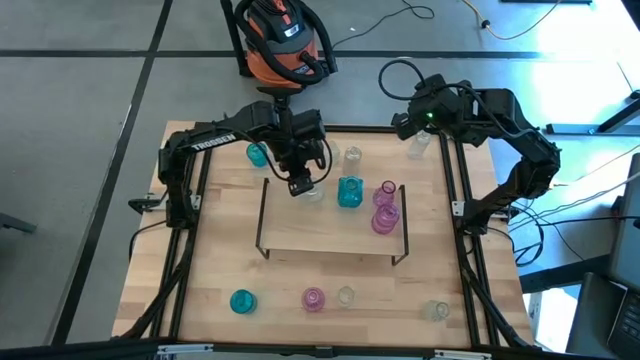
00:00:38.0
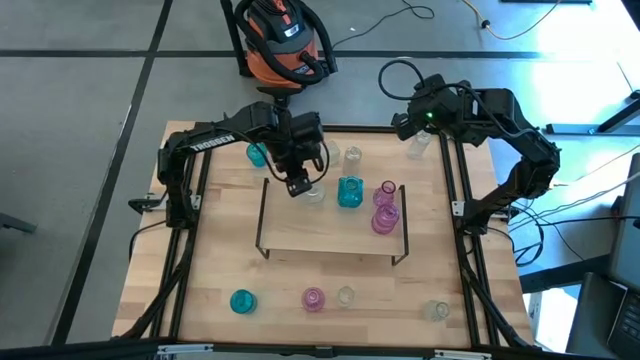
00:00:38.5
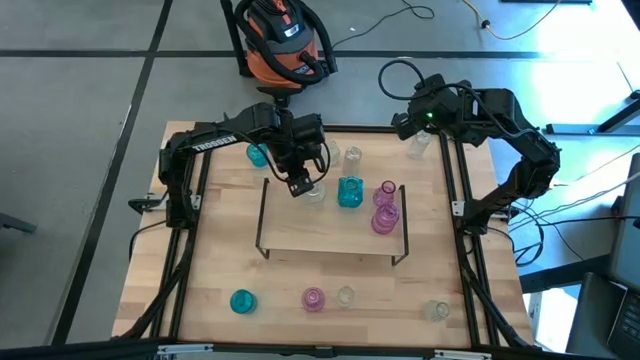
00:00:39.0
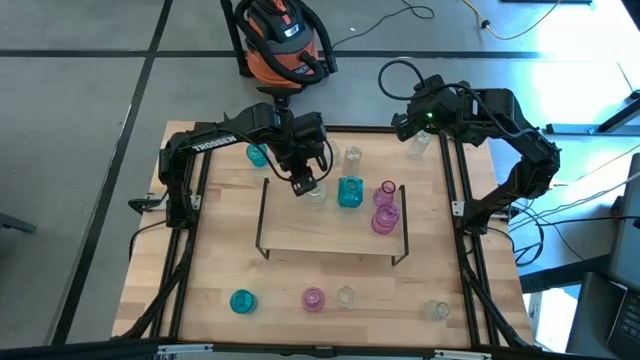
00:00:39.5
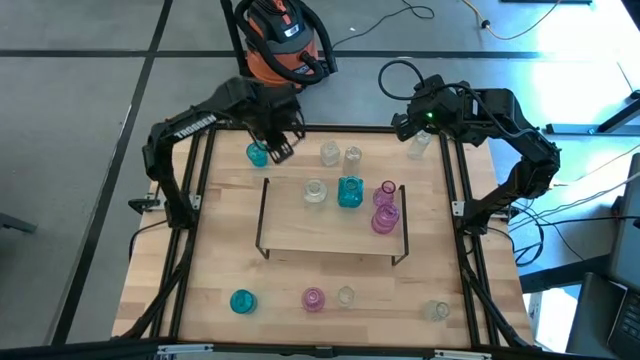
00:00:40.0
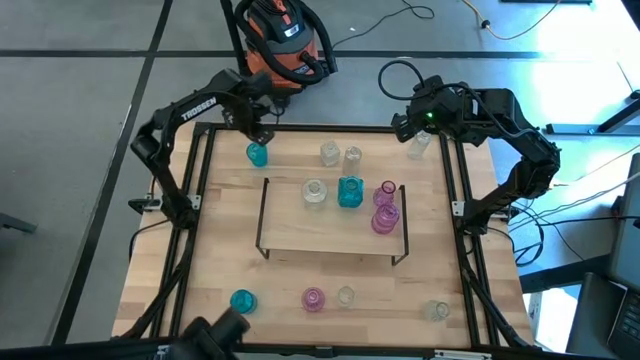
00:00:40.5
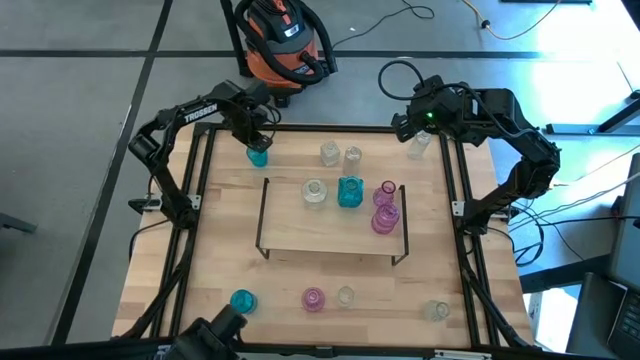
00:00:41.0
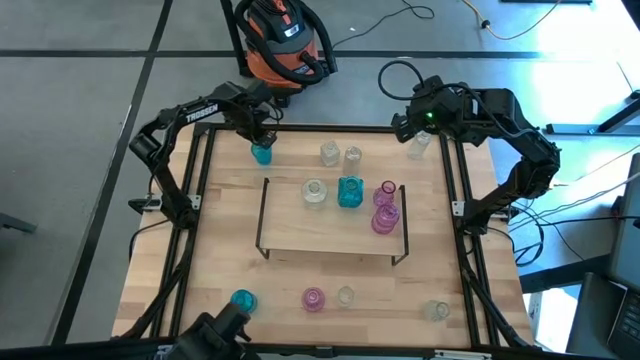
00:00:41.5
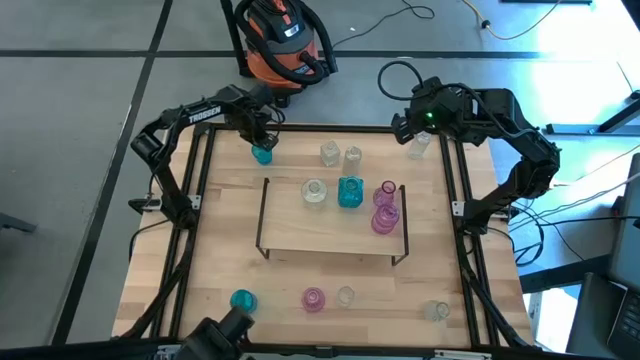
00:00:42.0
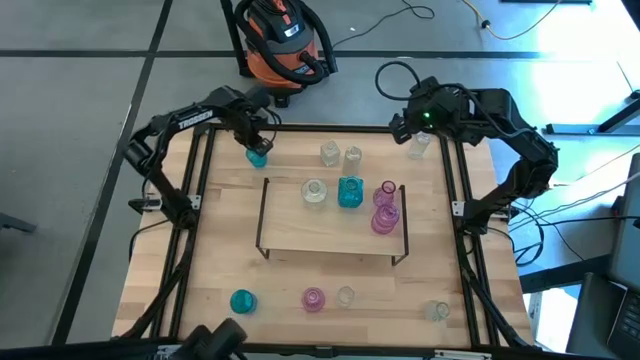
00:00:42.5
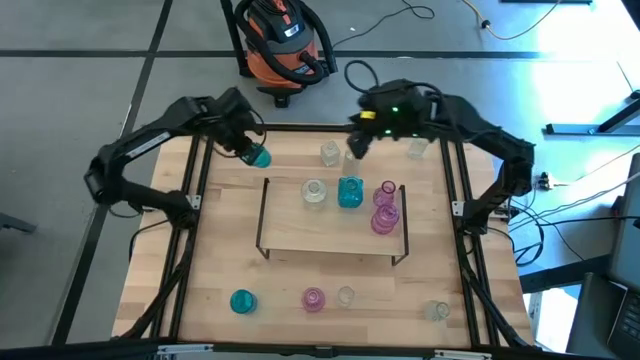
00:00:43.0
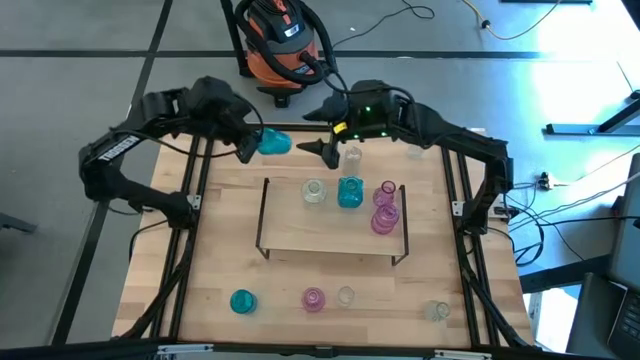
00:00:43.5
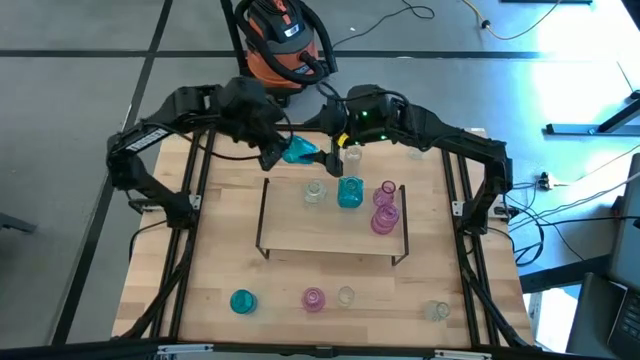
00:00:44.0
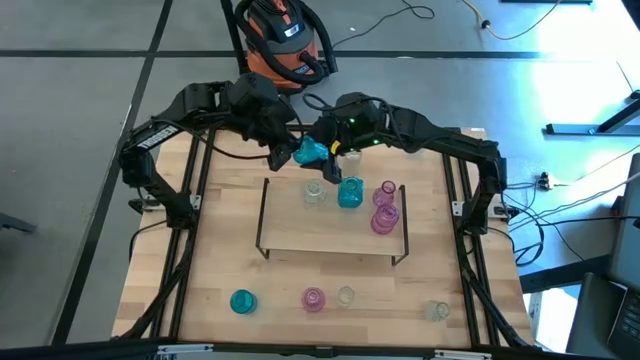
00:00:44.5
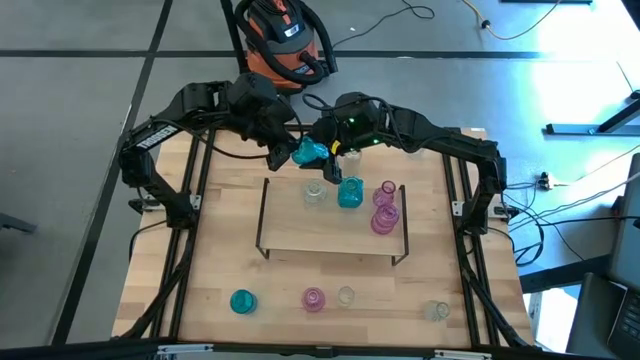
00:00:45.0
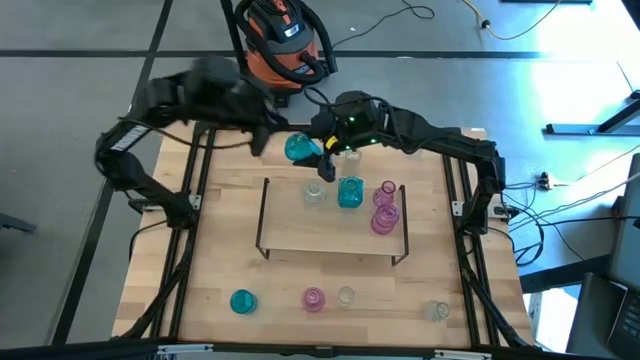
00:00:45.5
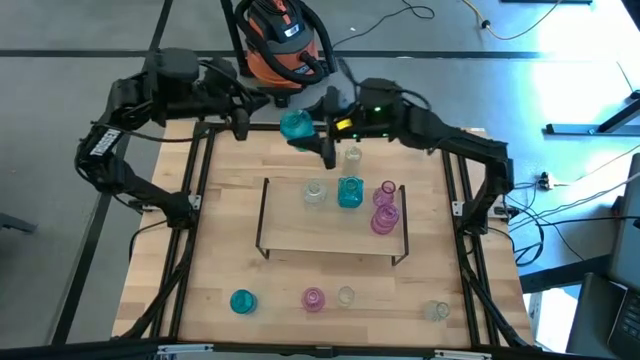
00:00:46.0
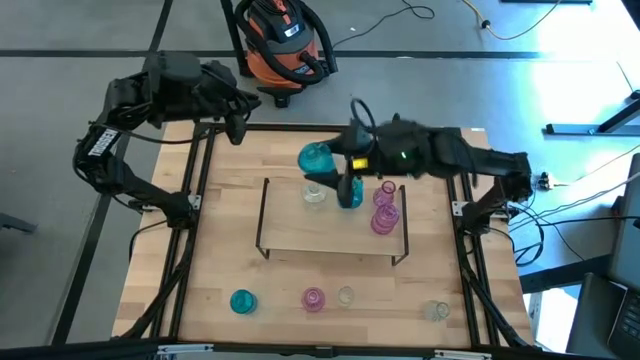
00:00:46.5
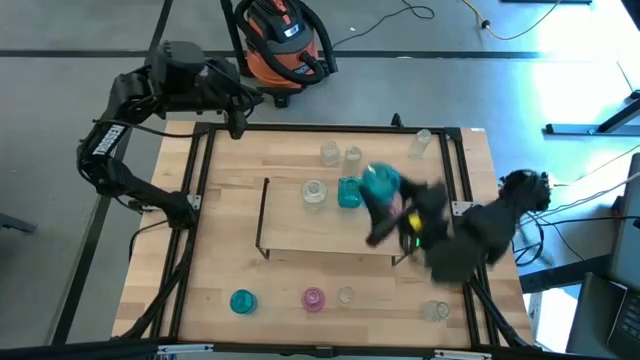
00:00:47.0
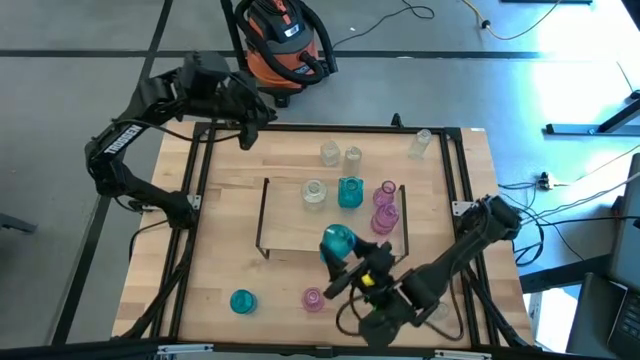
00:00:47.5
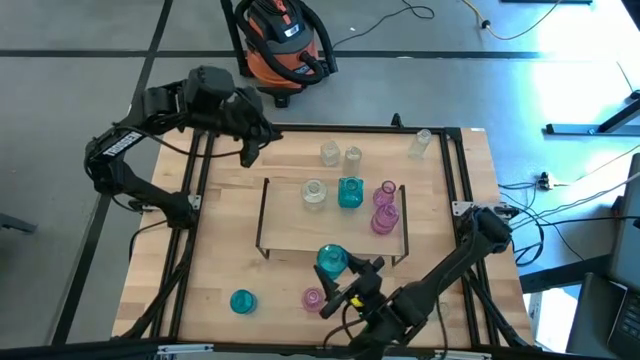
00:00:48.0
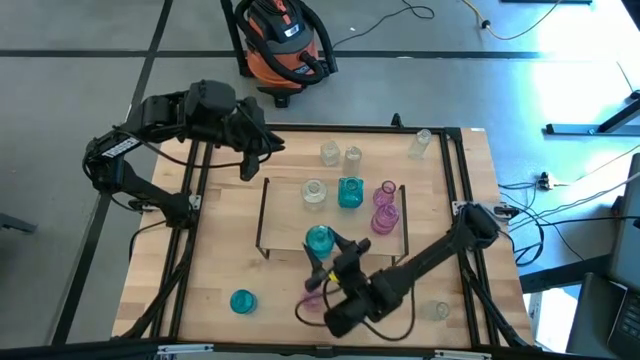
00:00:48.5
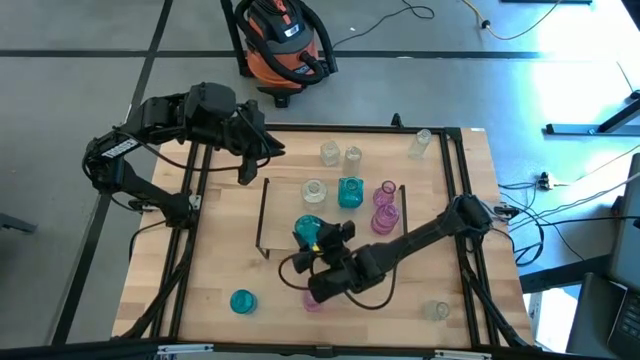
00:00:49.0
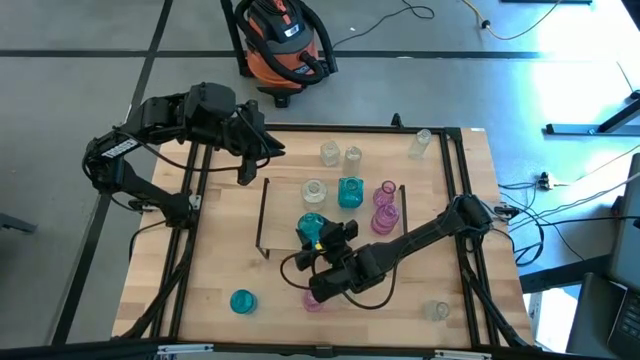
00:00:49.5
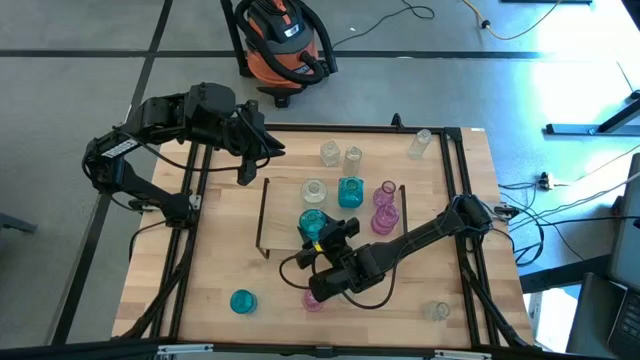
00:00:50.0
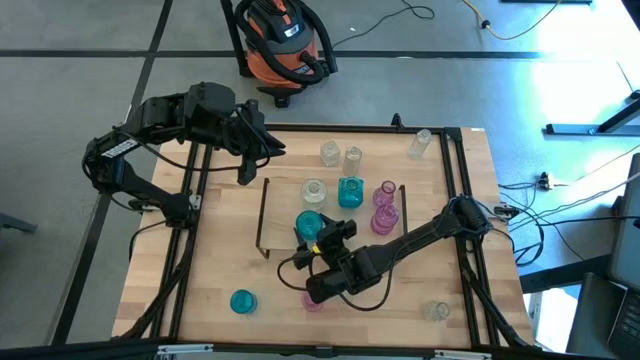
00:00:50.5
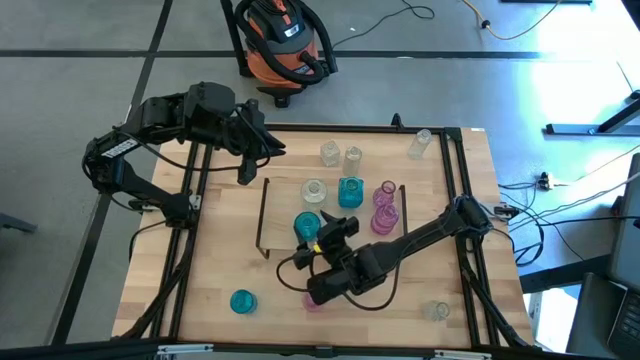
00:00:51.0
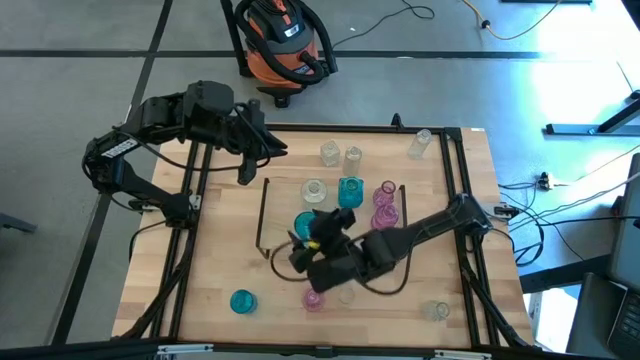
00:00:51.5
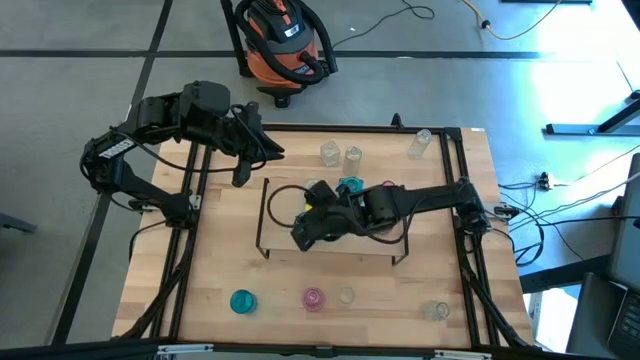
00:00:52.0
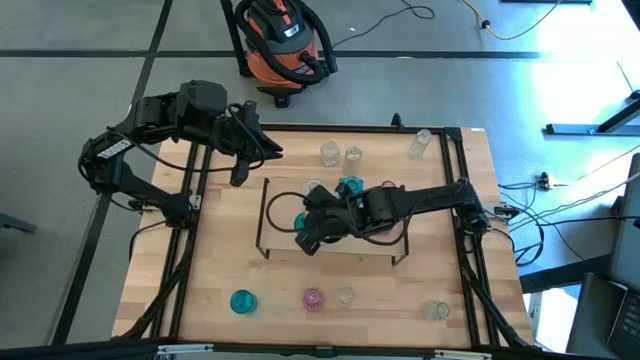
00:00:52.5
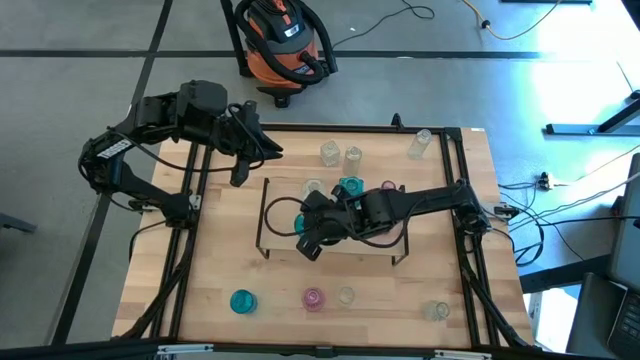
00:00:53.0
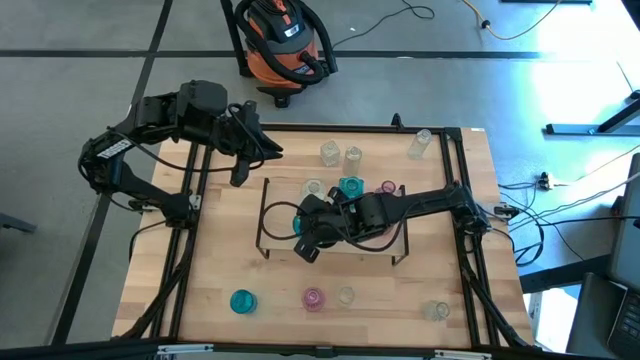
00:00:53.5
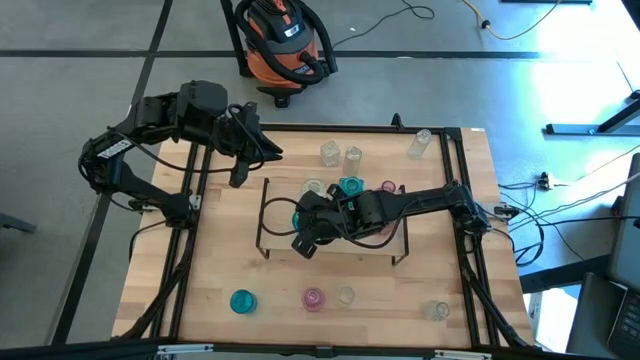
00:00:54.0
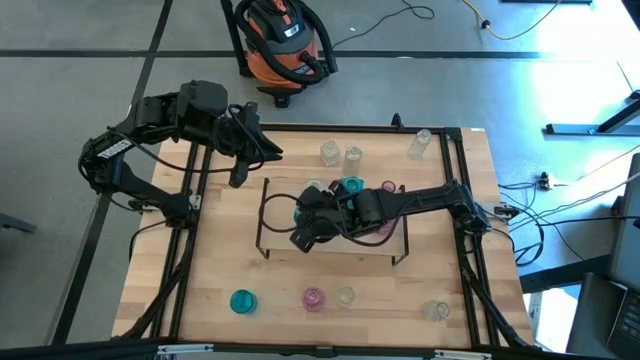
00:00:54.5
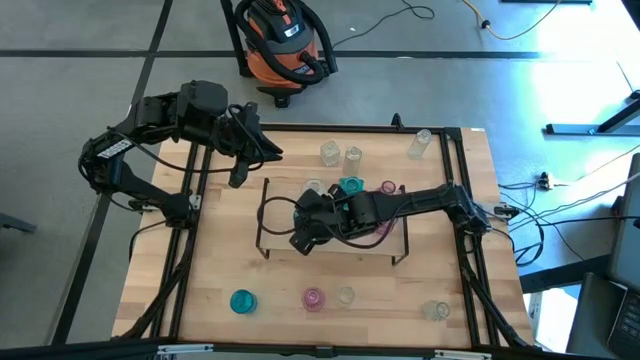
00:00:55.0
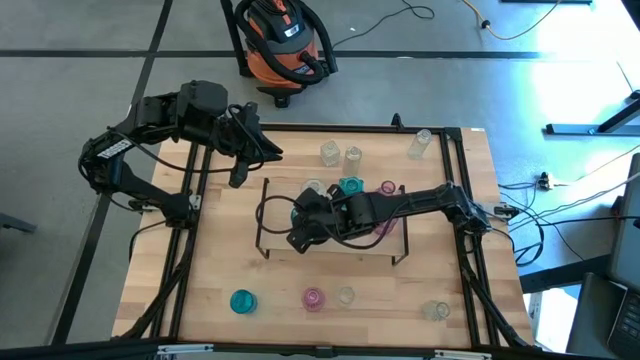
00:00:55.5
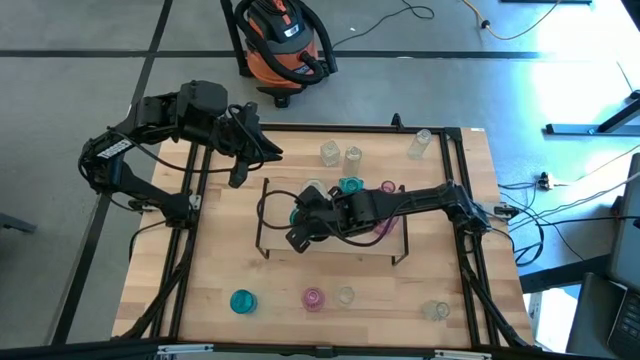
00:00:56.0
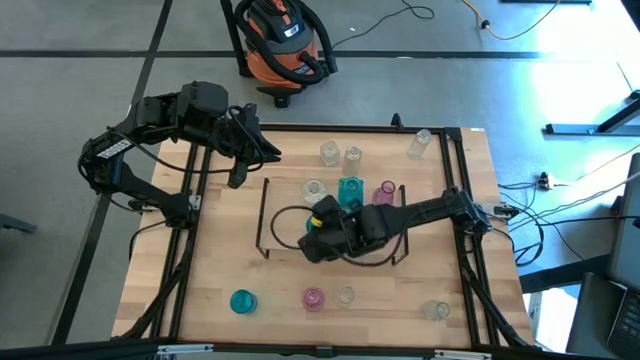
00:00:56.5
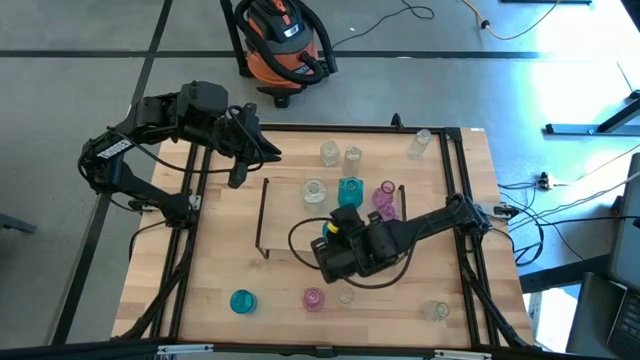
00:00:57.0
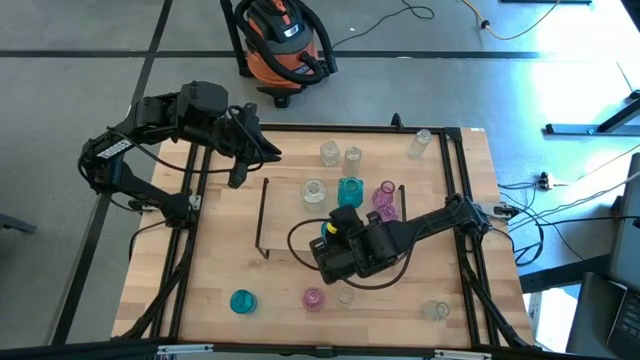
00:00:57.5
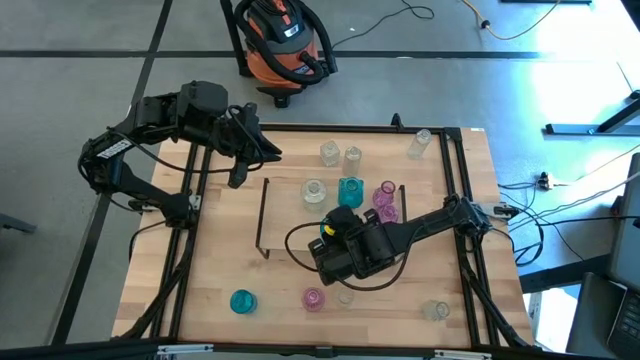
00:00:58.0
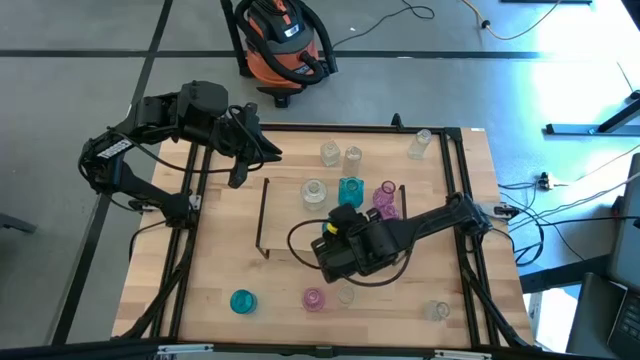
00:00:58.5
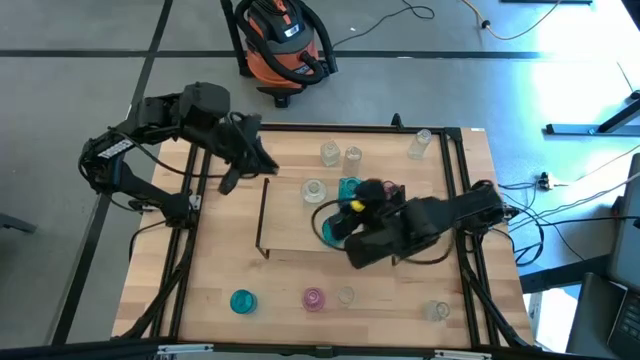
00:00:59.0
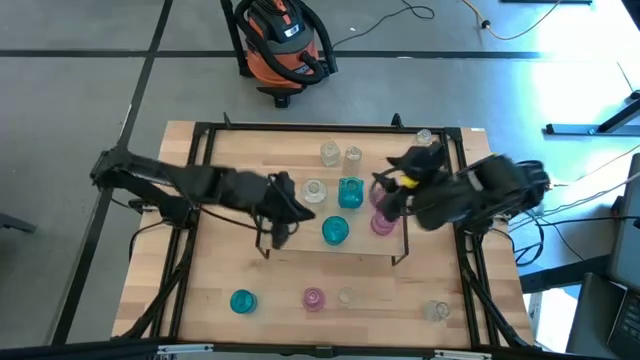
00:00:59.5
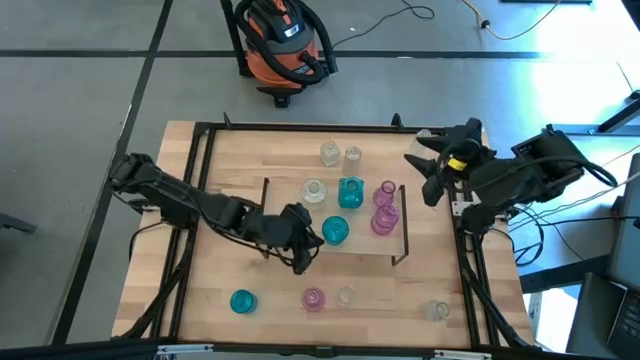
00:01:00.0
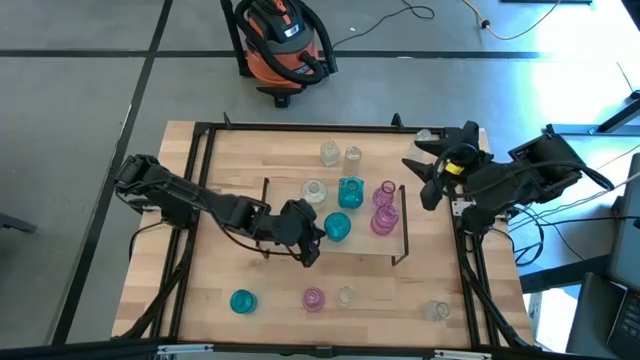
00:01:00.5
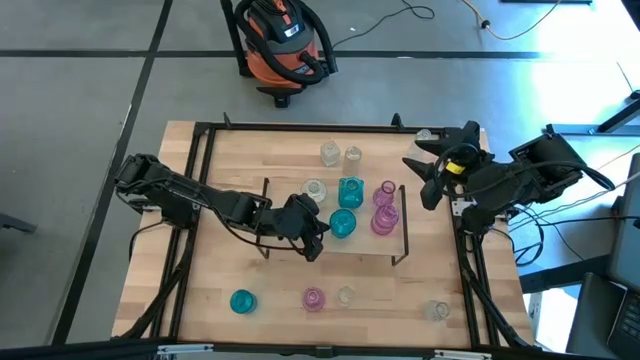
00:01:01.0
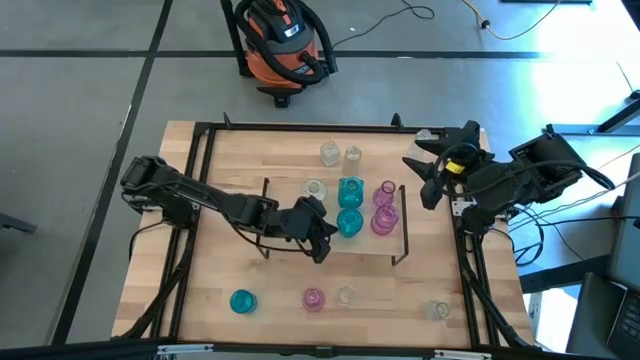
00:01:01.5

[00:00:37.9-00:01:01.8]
Task: sort vases onto shelf
Put the top blue vase on the shelf
